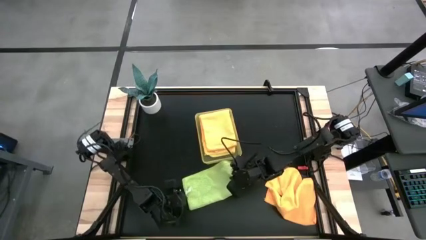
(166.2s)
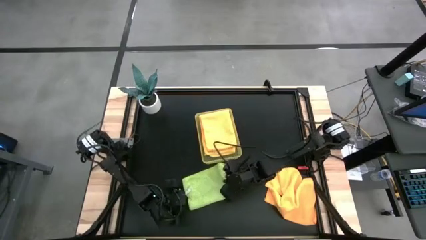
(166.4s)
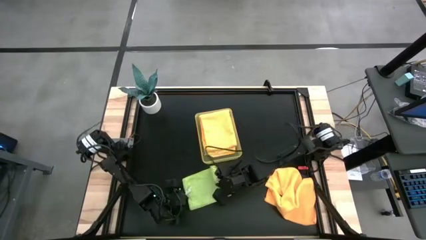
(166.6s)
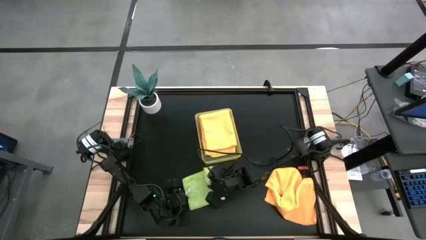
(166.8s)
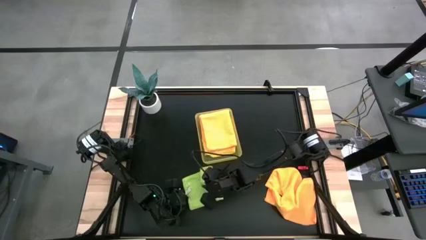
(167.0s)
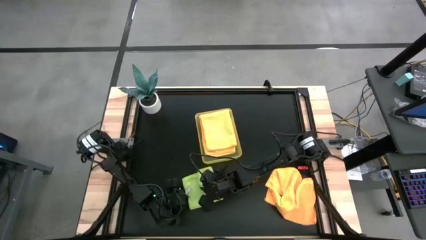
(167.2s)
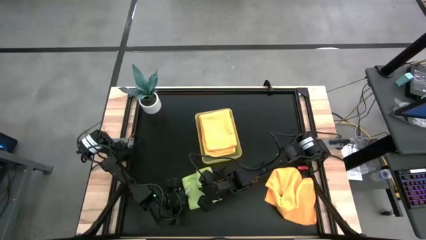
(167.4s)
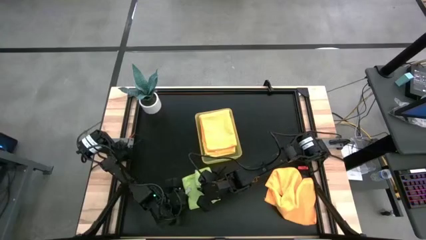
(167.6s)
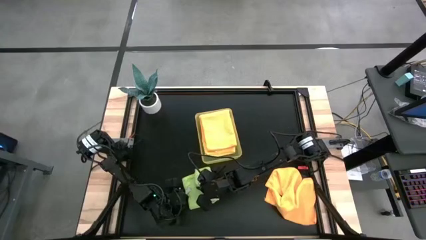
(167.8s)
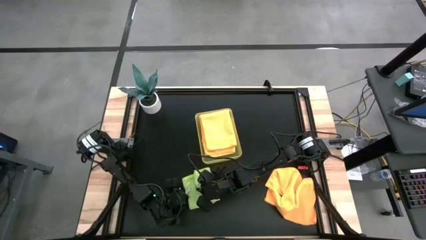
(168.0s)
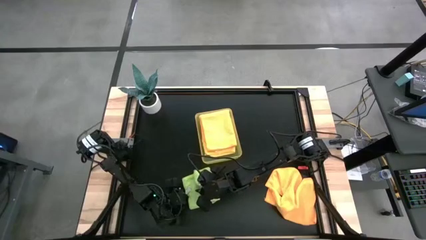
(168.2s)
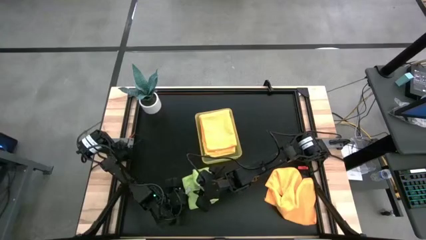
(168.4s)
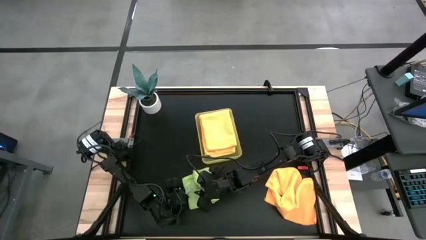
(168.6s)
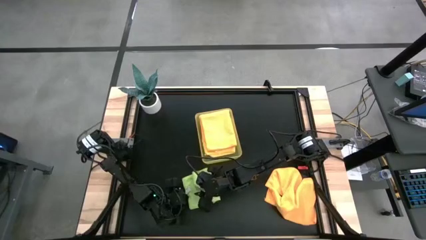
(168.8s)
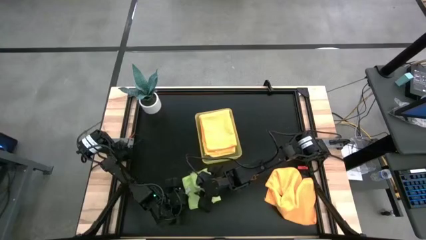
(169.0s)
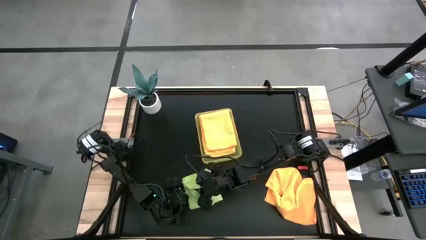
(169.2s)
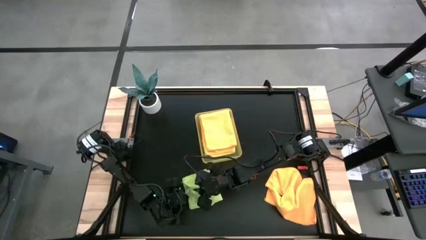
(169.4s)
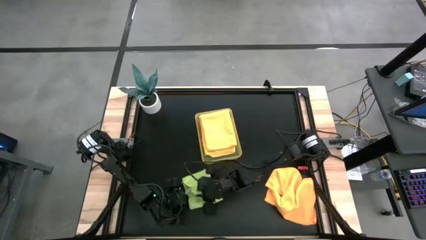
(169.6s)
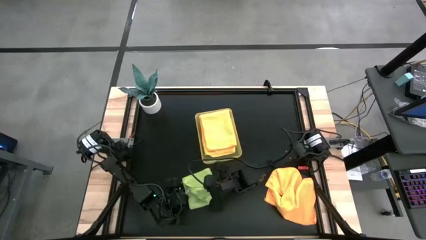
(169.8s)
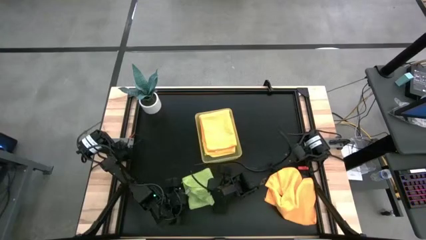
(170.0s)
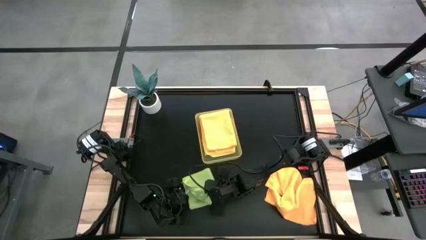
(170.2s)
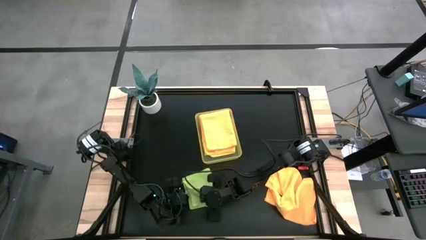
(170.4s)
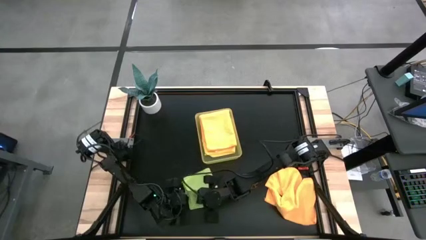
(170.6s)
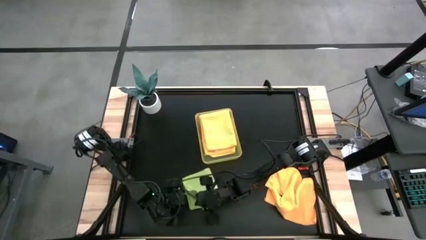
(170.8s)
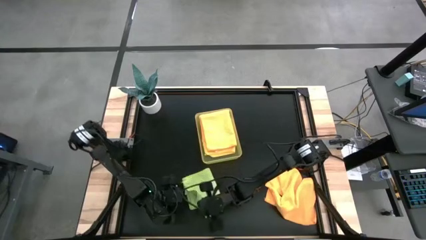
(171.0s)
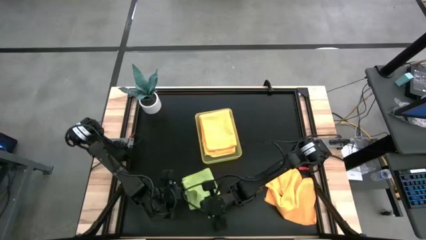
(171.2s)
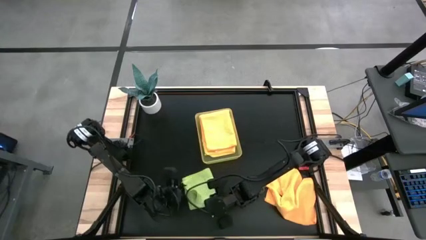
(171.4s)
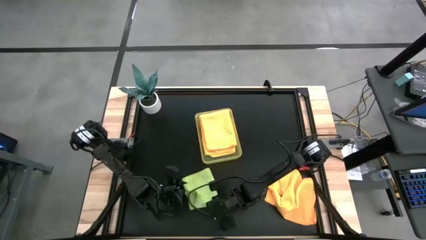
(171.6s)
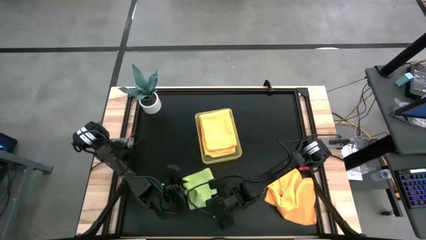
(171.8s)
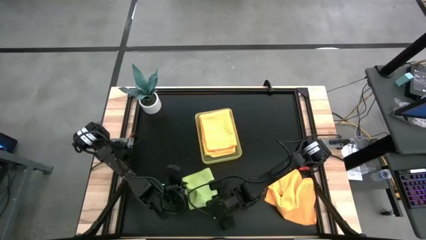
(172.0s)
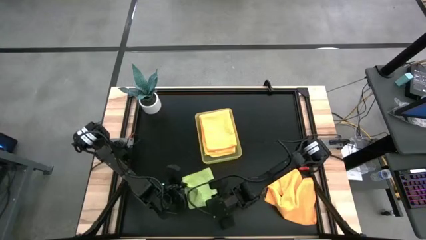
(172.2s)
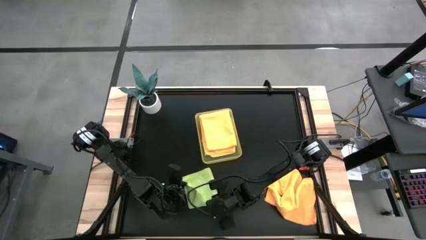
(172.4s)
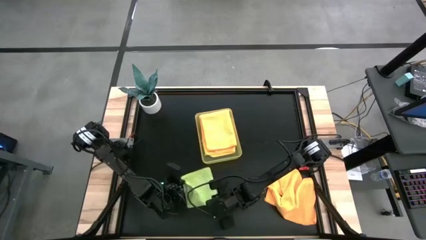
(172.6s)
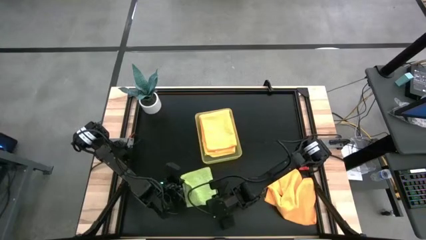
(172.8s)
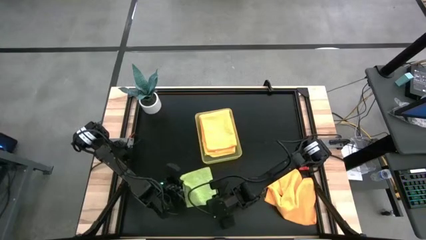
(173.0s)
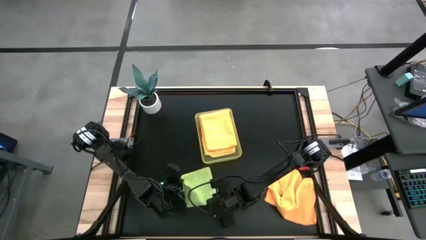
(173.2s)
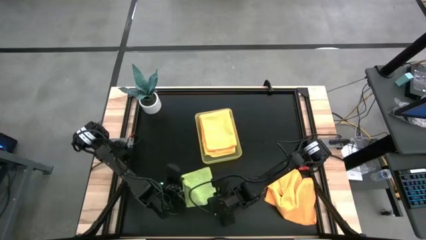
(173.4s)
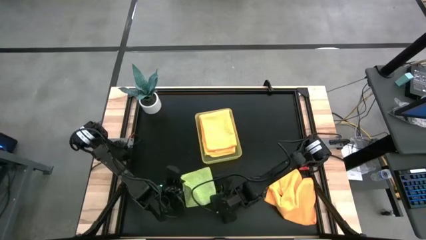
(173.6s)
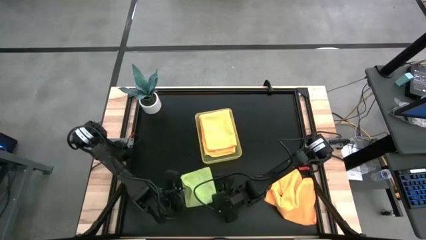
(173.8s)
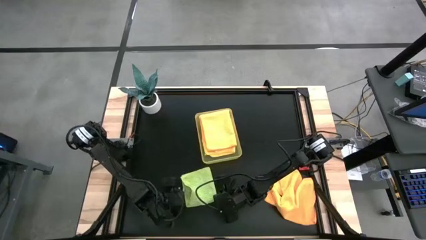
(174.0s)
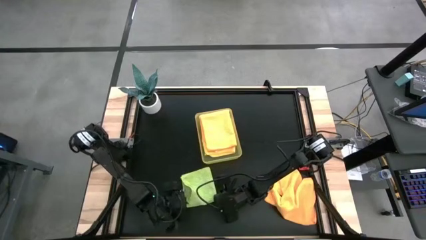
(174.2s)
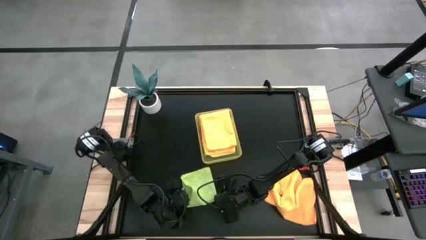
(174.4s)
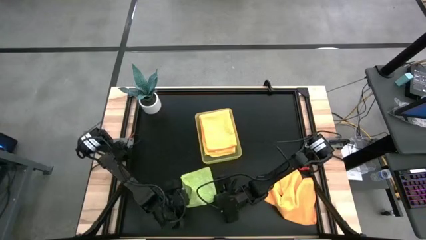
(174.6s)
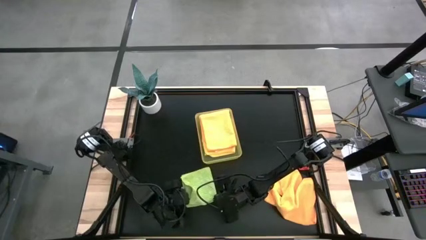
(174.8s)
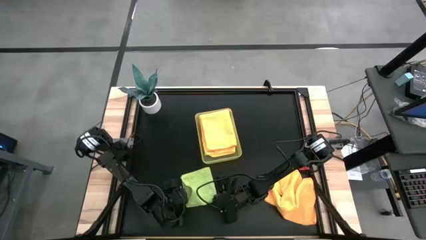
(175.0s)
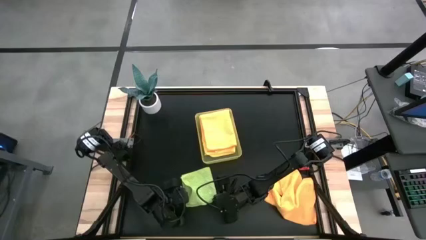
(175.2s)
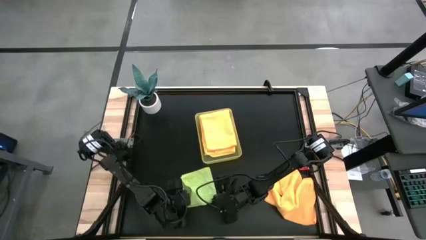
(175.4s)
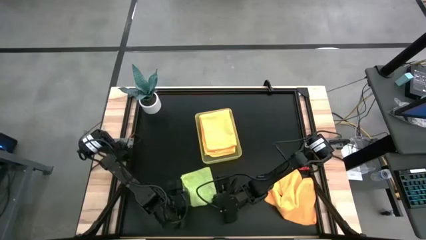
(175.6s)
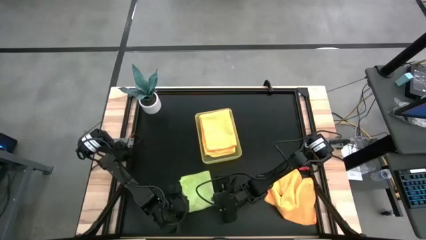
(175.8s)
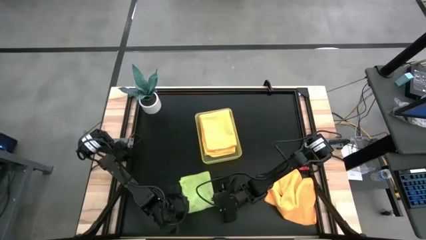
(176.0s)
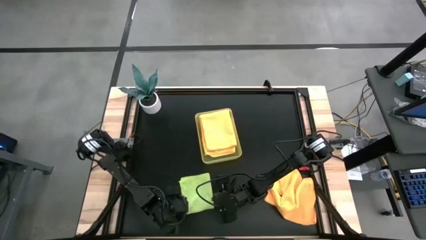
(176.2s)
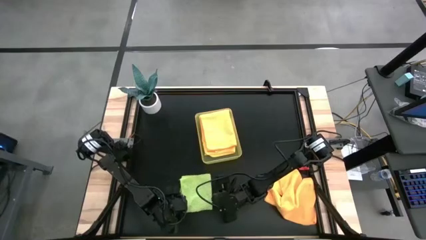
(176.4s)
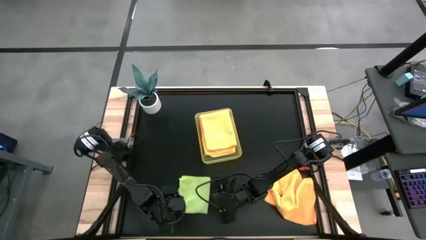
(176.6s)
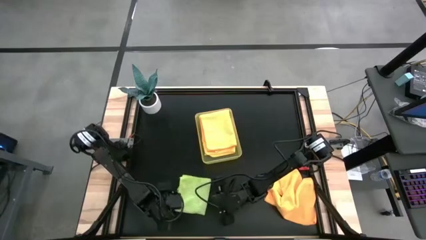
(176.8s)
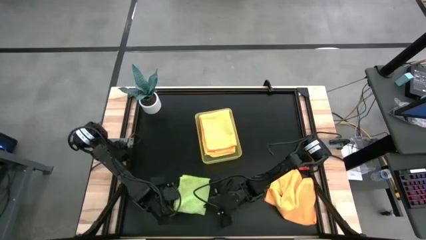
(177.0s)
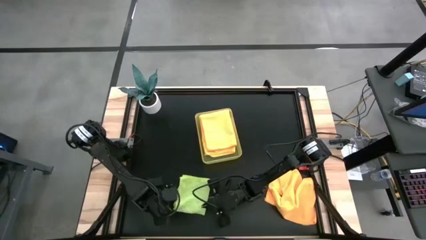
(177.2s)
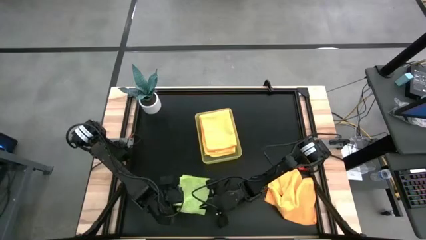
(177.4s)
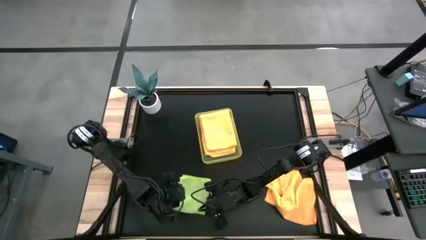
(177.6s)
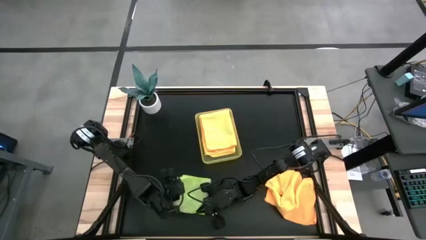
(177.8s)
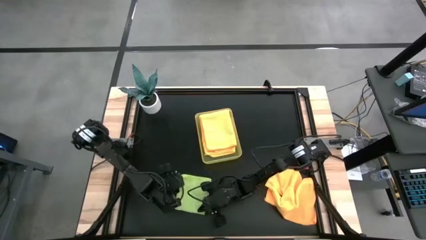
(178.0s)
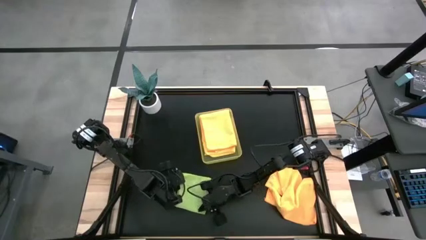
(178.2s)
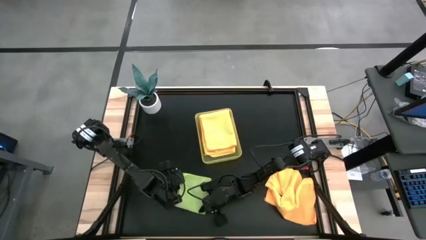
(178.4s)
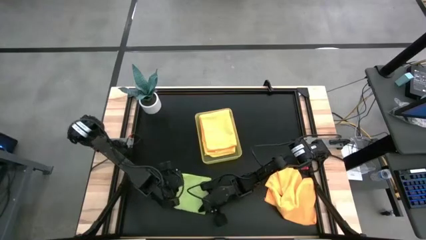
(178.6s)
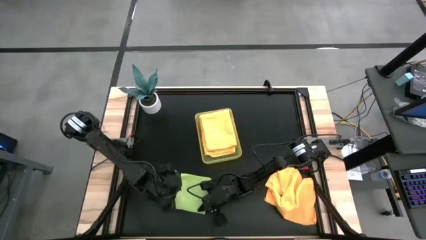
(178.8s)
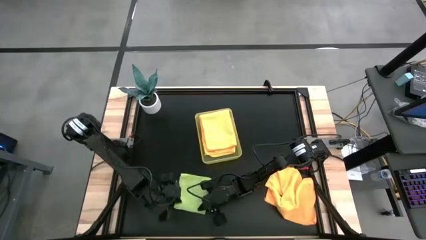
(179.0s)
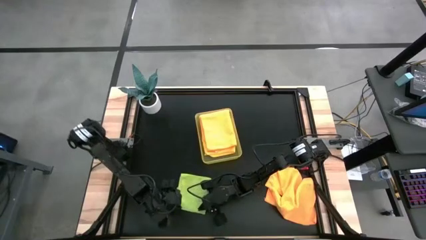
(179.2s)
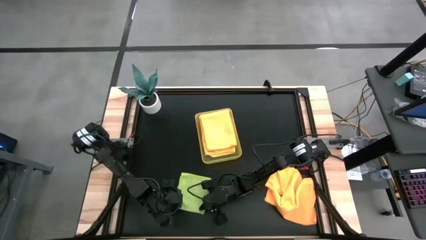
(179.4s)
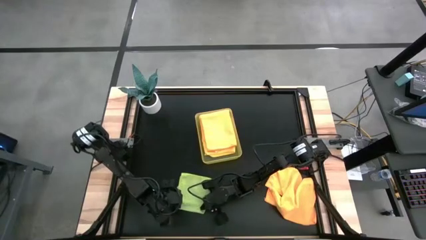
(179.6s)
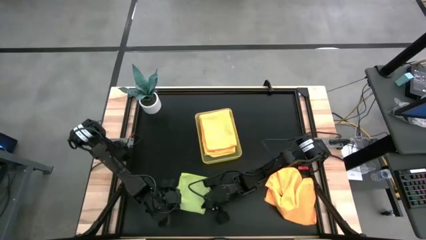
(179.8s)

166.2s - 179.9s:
Task: Fold microfiber towels
Fold the green microfiber cloth

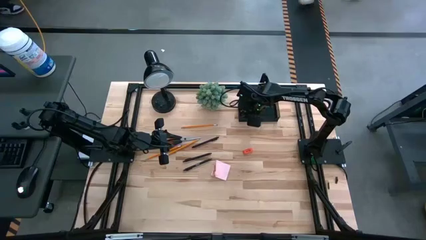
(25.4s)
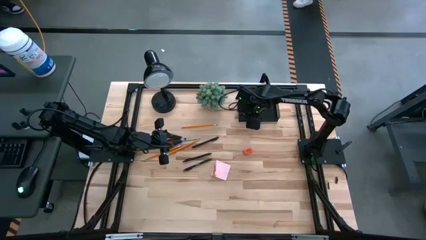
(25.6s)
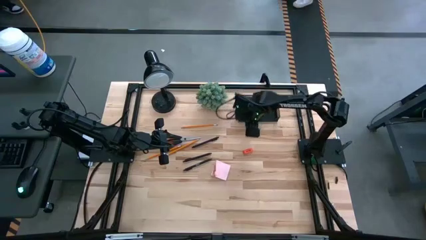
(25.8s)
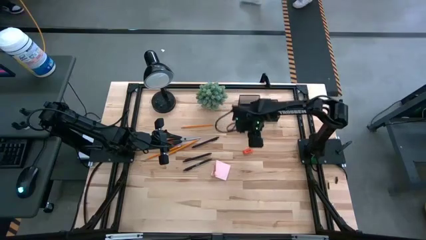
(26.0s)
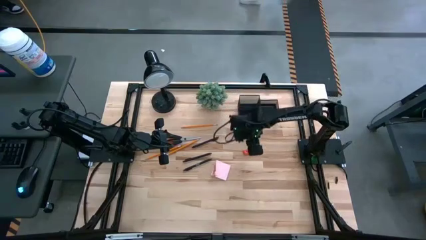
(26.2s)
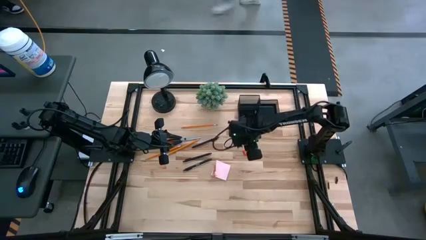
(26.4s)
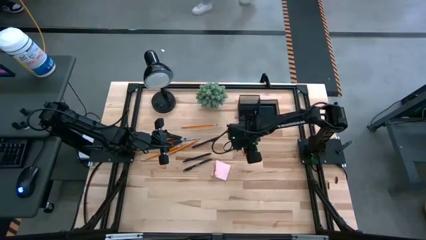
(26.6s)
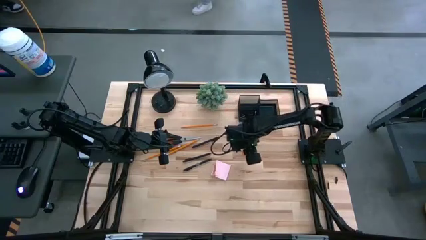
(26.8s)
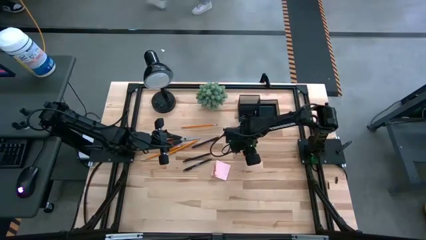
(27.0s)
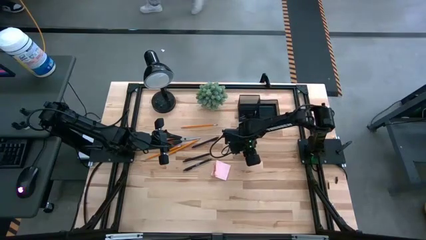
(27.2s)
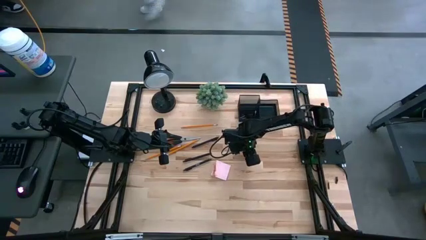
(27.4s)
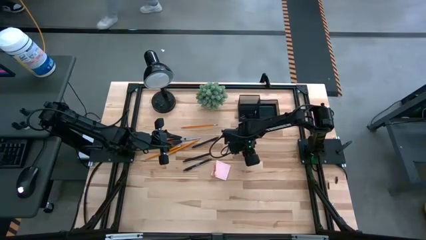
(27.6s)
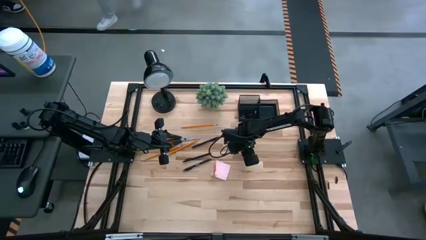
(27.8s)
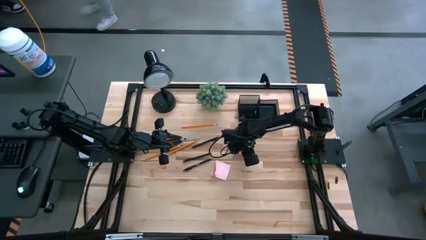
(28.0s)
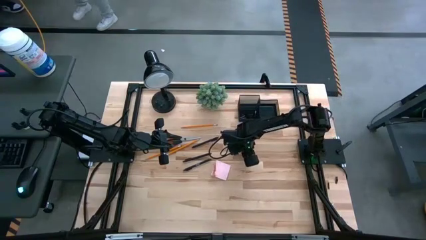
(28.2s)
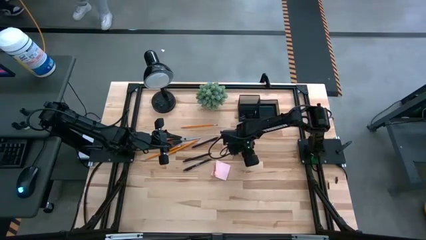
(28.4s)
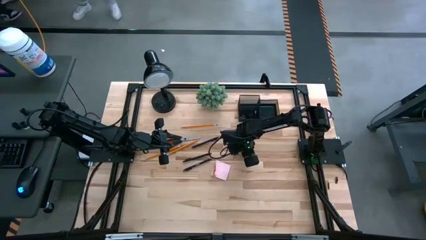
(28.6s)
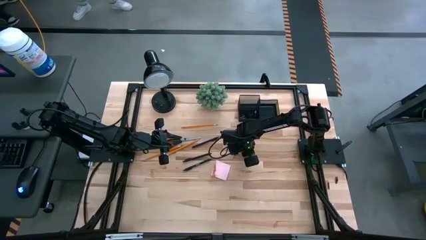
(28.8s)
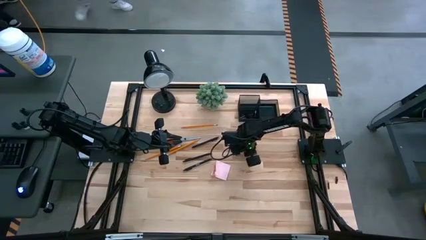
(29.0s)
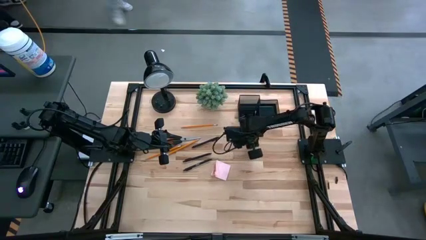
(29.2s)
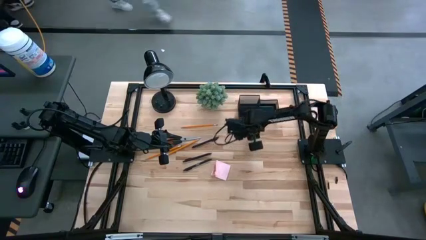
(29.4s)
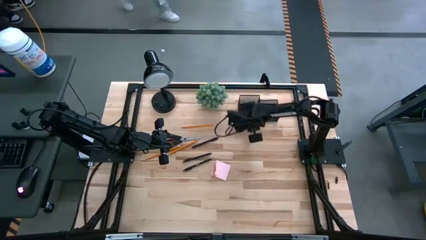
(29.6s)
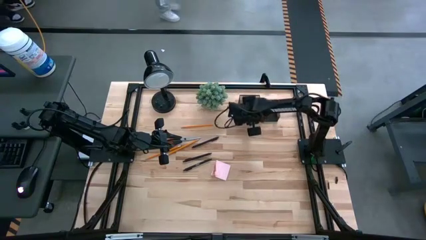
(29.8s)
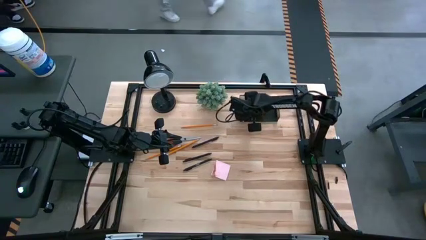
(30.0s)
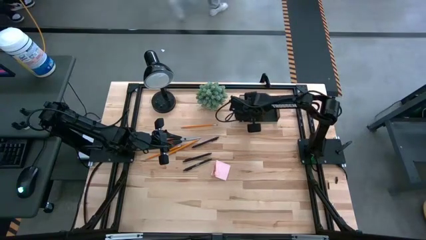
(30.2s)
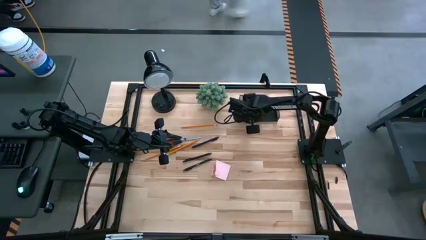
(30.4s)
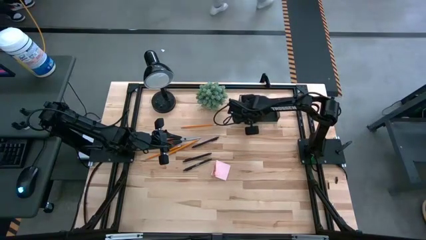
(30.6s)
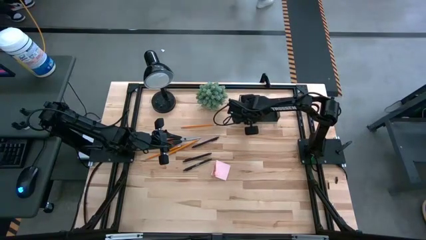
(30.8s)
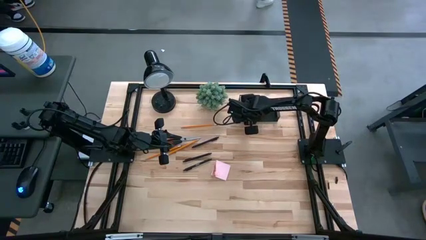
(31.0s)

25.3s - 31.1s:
Task: Pick and place office supplies into organizer
Put the orange eraser into the black desk organizer
